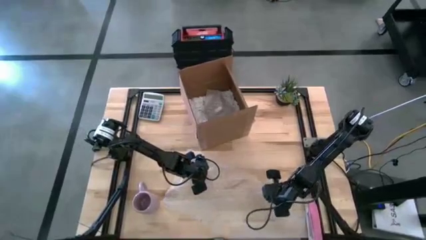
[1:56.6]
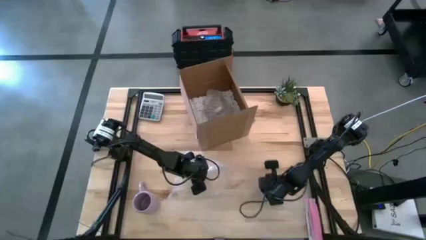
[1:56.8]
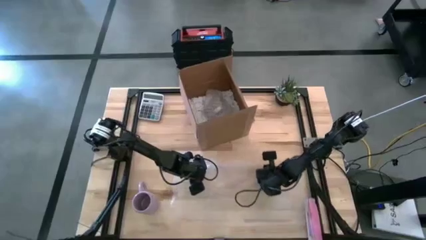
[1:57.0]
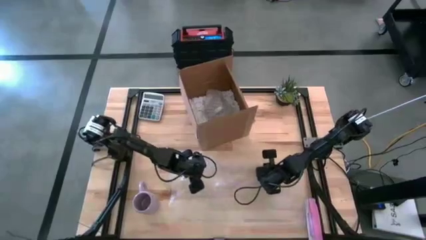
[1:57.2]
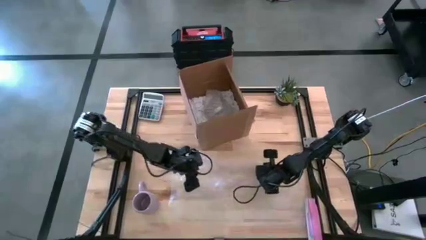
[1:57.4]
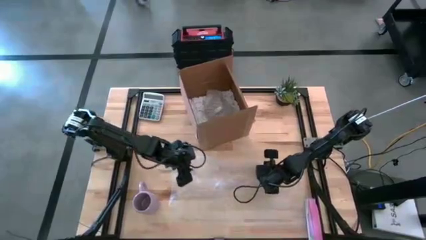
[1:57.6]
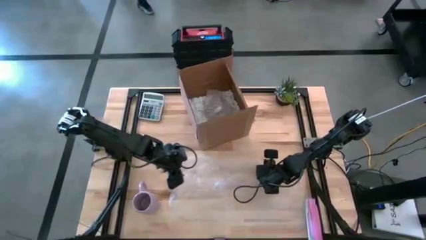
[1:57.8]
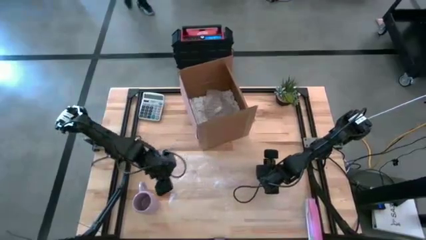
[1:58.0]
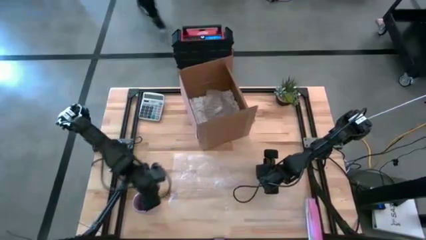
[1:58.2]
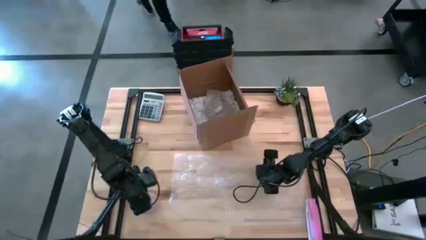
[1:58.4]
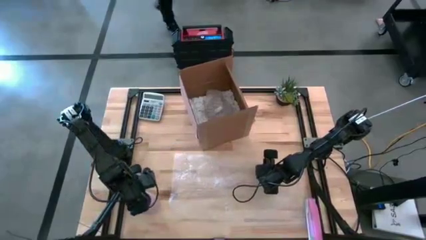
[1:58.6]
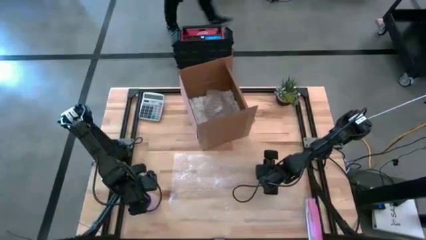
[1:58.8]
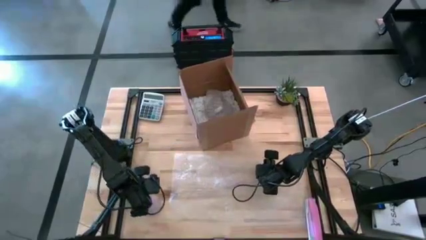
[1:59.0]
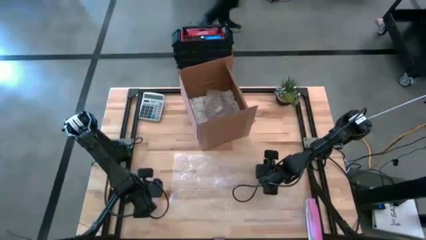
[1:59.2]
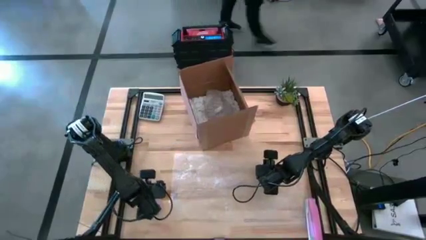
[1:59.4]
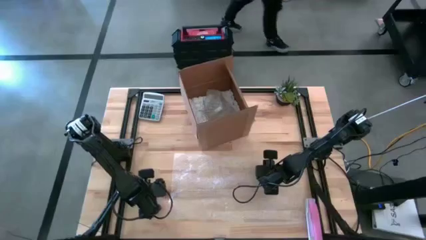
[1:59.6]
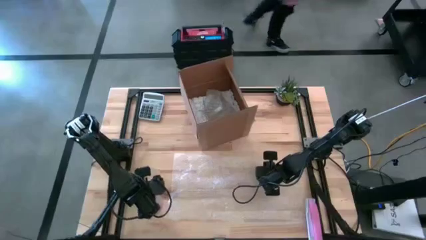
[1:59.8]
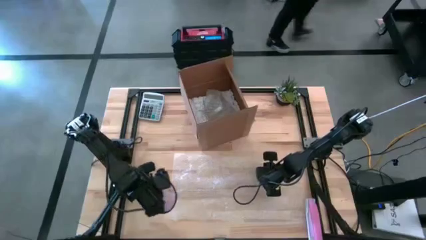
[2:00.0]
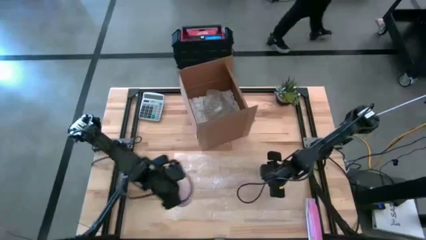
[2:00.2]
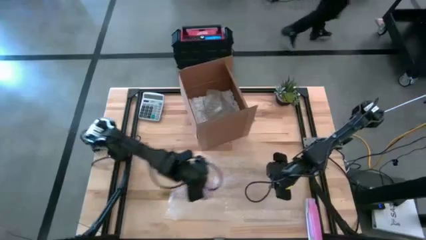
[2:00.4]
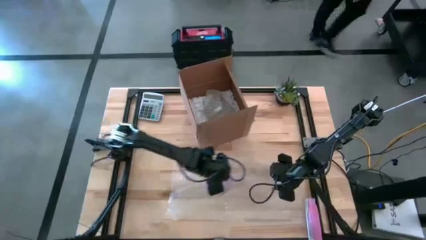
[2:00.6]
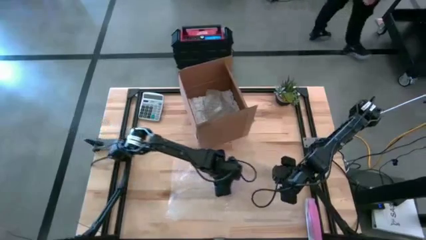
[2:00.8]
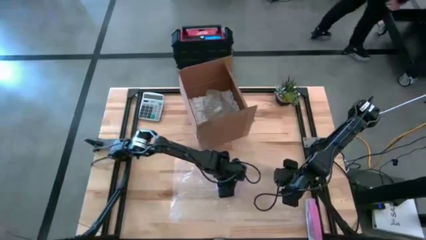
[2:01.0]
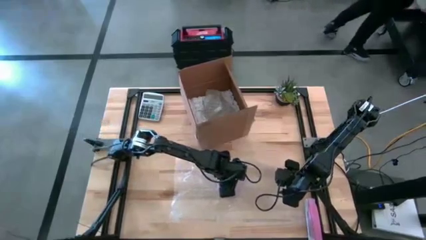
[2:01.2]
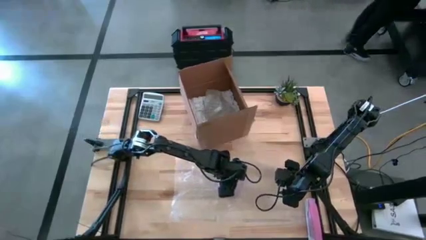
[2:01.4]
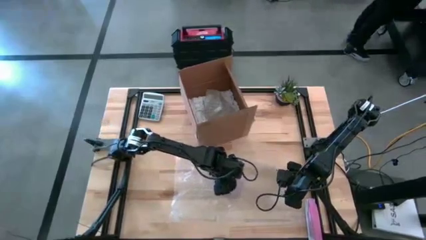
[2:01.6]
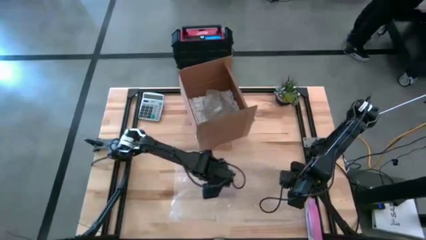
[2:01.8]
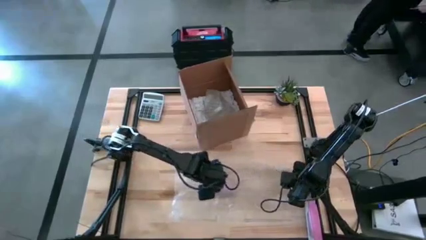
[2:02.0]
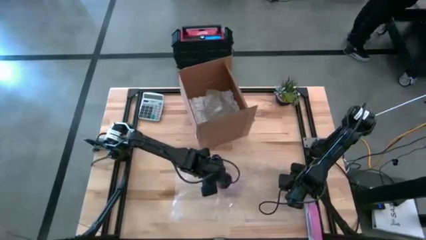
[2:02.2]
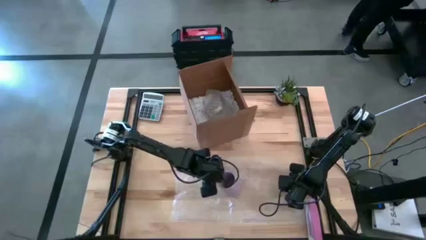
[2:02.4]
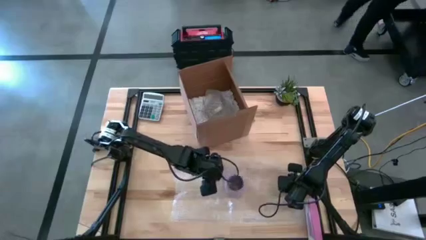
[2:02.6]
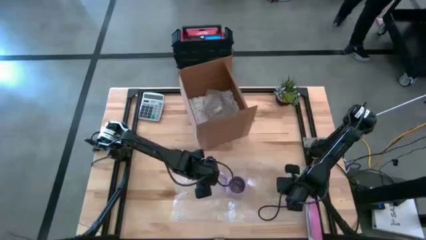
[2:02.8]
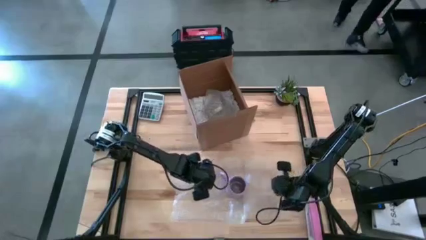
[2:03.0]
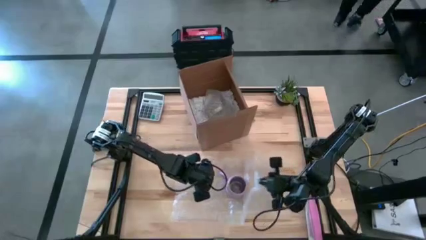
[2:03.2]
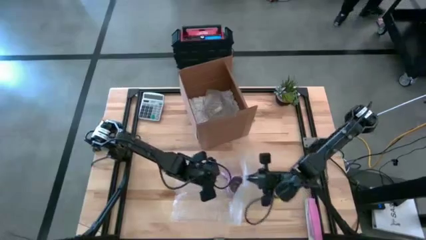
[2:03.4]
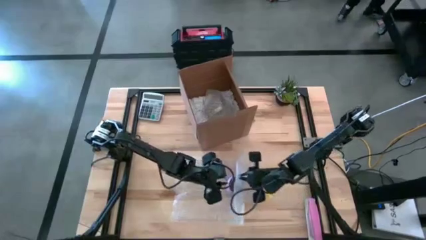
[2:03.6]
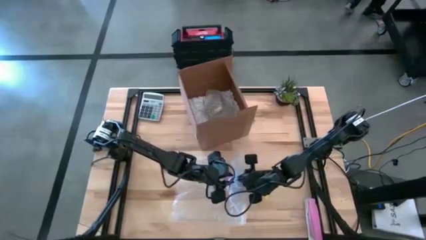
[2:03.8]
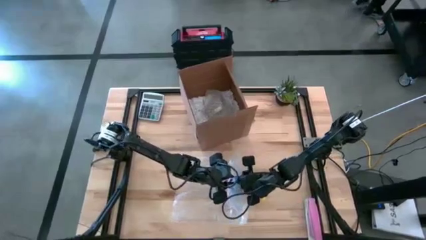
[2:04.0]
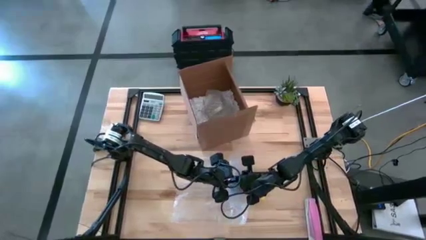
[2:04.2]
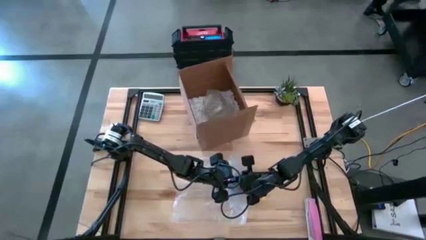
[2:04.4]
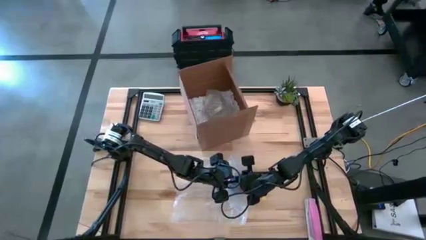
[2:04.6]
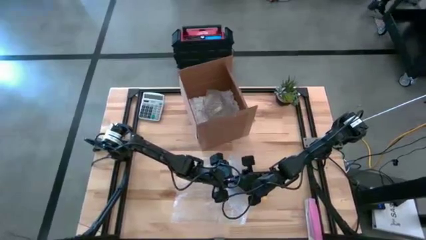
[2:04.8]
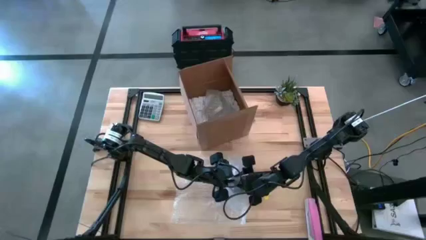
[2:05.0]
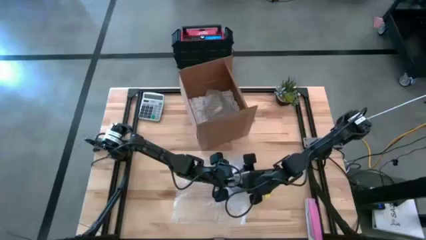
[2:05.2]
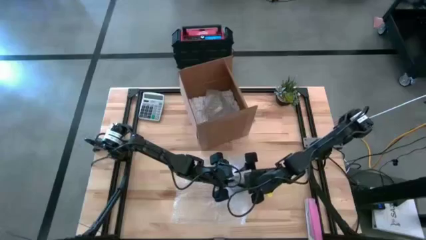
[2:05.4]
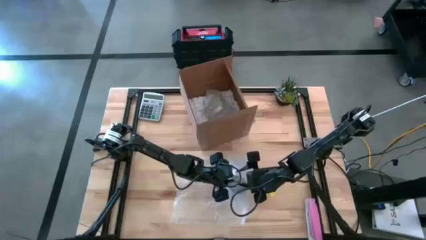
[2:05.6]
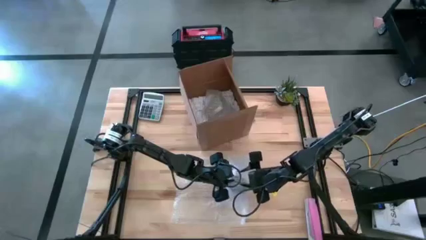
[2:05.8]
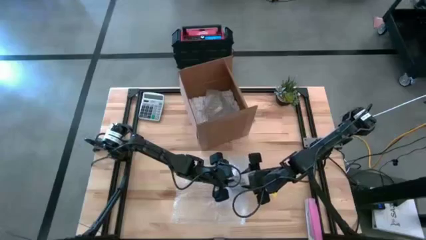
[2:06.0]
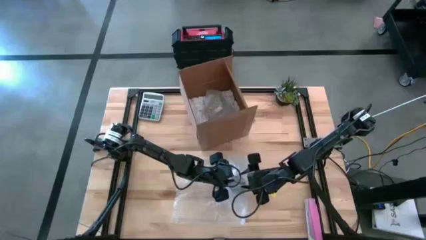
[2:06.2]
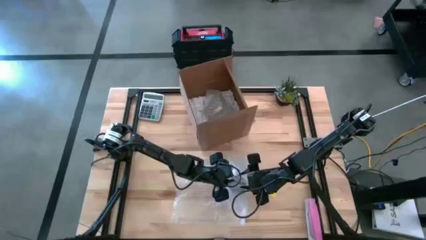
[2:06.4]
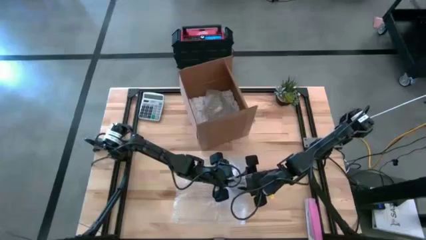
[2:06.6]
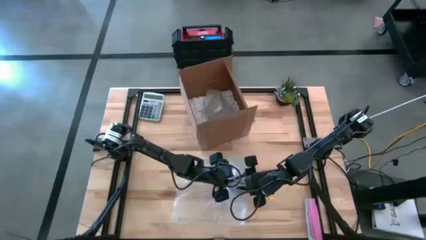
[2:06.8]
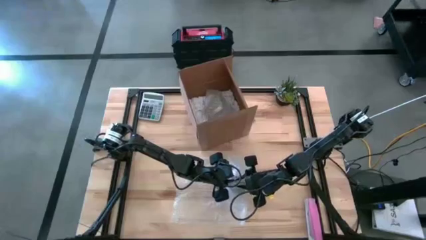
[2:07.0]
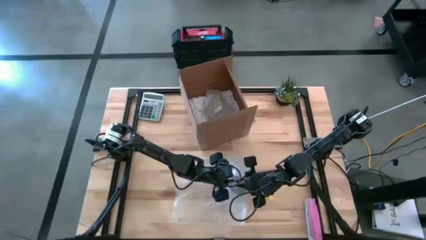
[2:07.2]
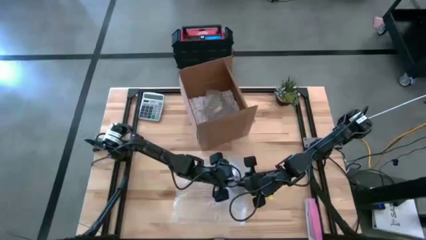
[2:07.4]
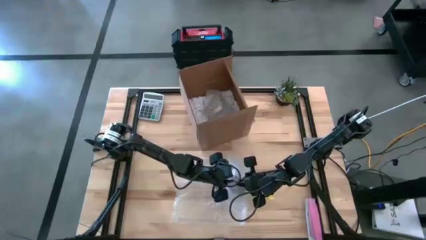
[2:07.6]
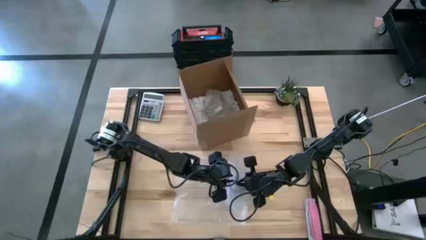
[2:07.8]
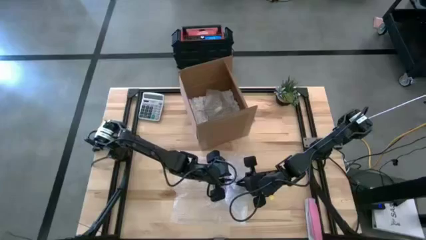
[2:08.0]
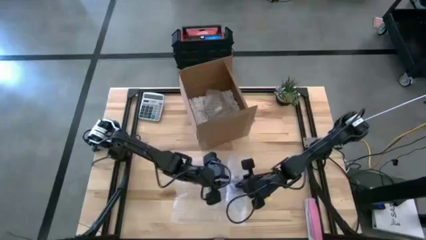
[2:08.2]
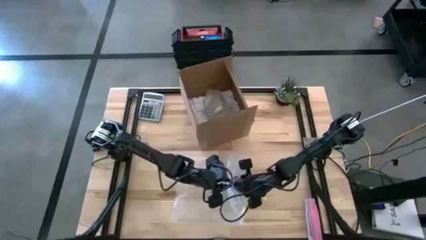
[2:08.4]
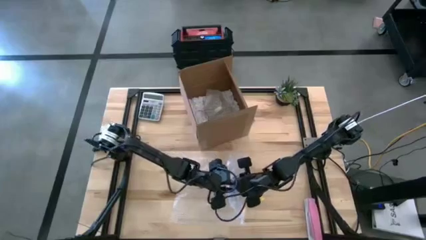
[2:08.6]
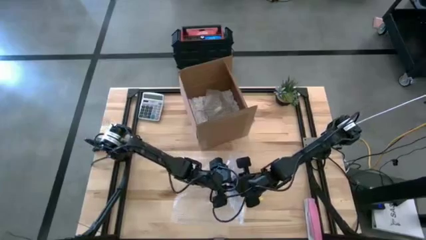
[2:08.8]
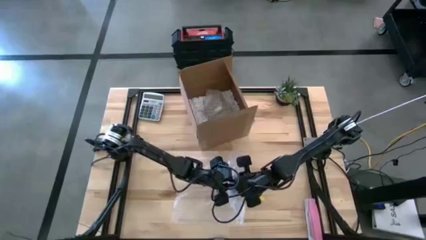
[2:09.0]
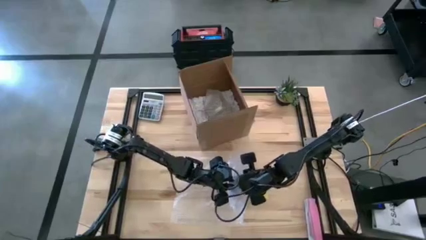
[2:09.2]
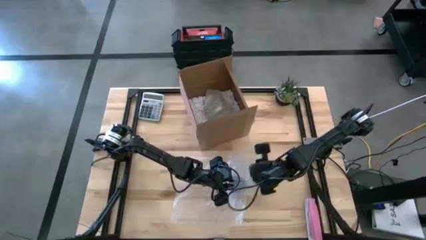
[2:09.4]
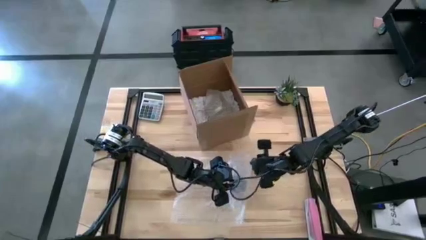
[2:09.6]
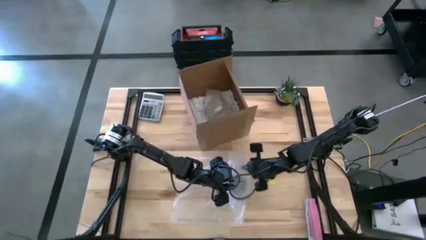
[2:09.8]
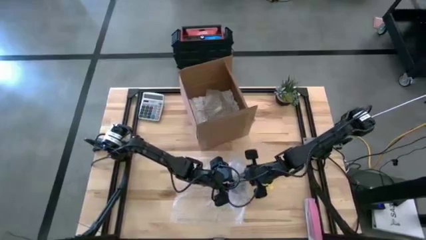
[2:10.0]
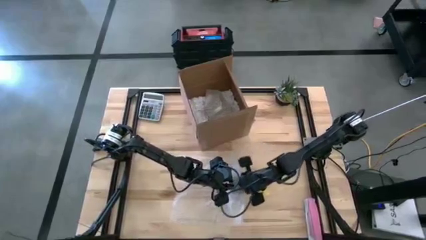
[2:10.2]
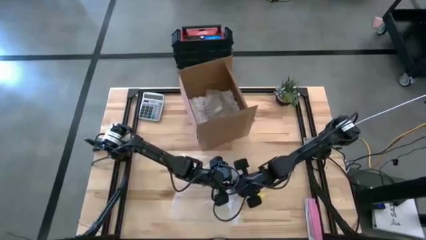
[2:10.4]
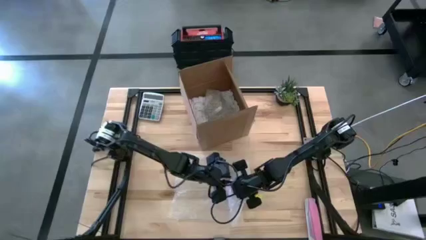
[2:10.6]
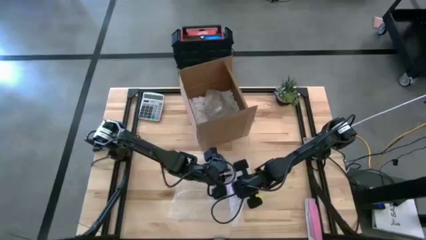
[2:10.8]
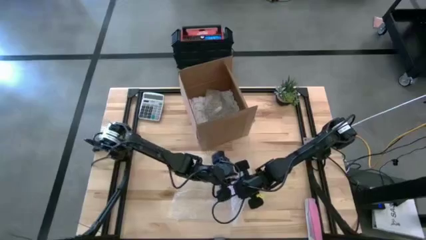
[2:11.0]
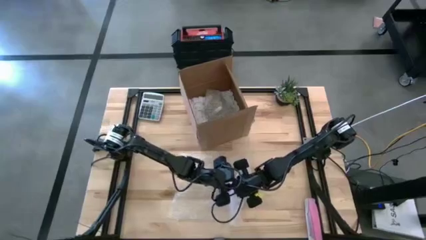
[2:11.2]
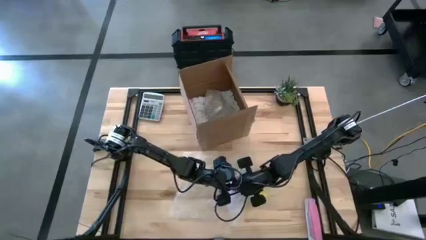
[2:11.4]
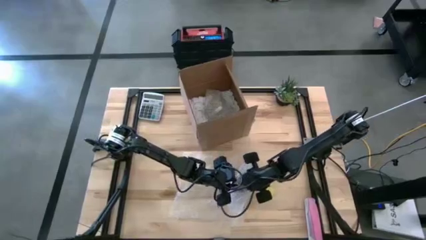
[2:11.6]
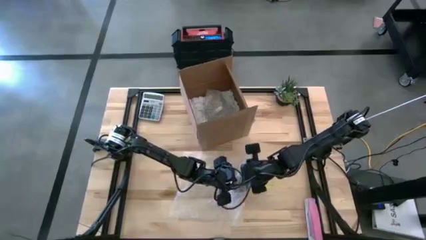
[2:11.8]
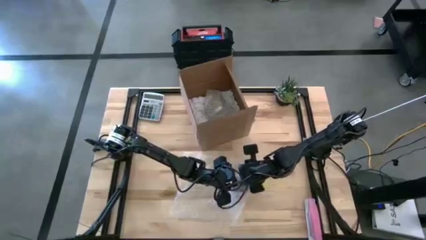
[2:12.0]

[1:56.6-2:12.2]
Task: wrap mug
Wrap the purple mug with the bubble wrap
